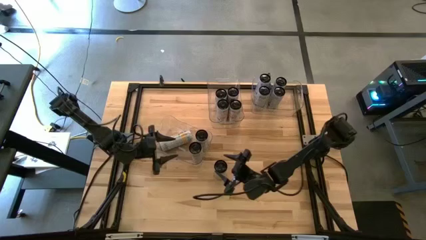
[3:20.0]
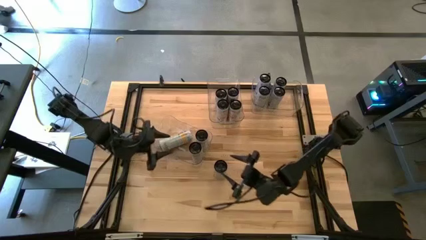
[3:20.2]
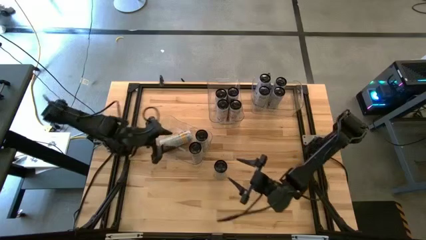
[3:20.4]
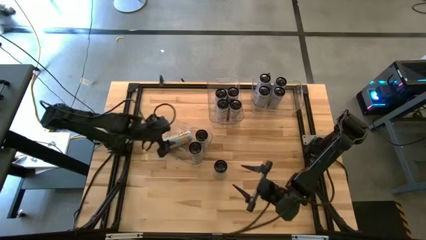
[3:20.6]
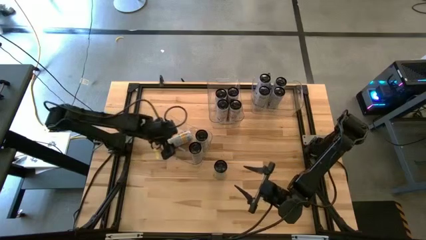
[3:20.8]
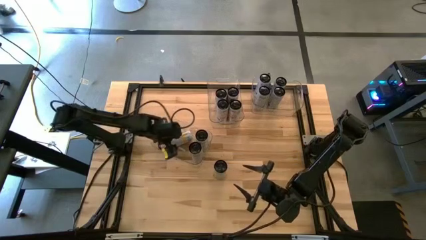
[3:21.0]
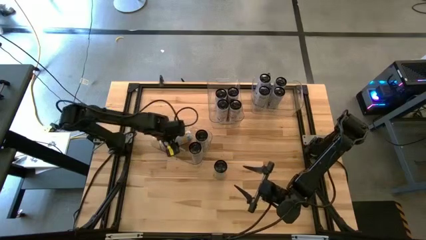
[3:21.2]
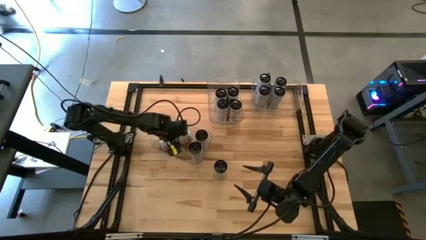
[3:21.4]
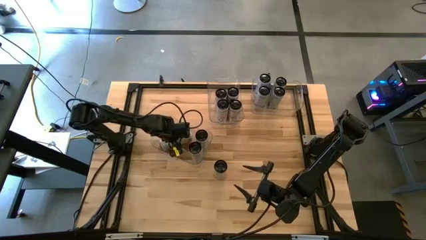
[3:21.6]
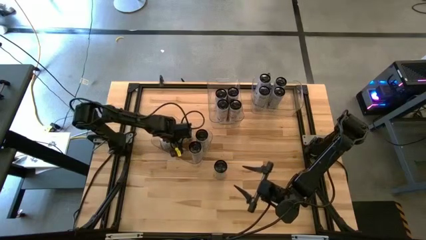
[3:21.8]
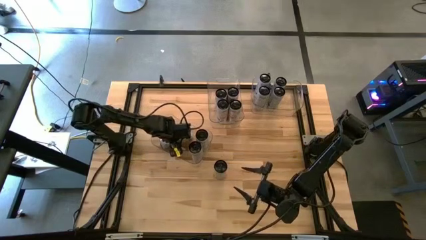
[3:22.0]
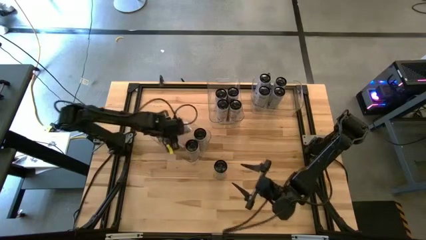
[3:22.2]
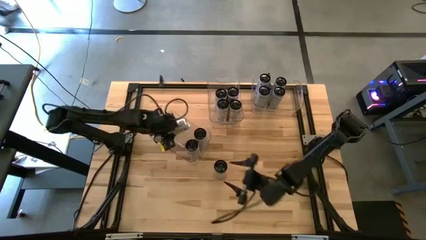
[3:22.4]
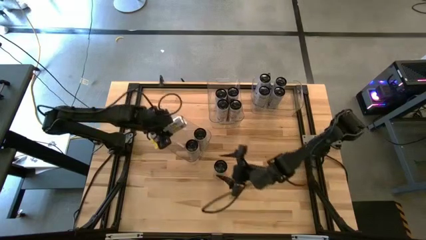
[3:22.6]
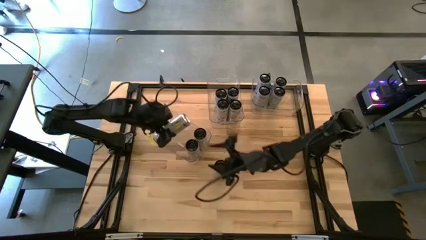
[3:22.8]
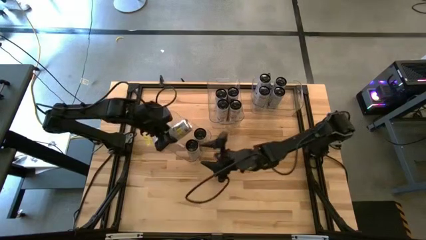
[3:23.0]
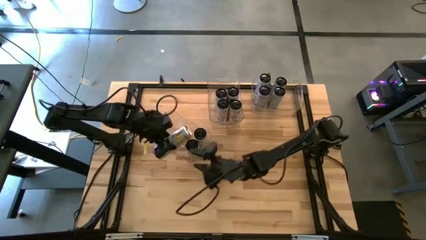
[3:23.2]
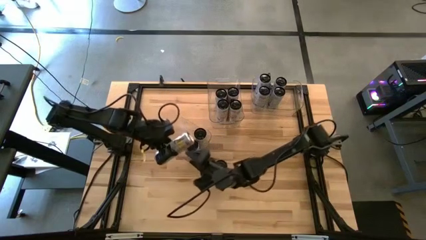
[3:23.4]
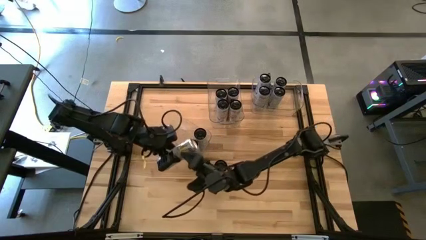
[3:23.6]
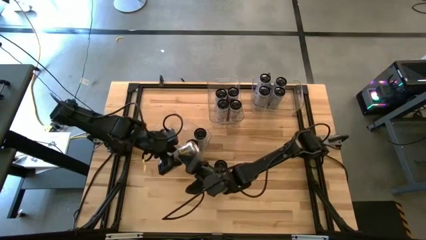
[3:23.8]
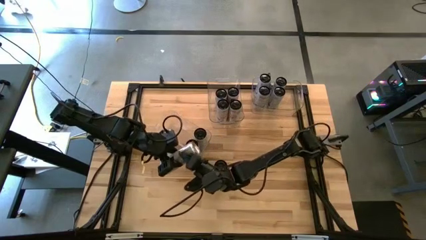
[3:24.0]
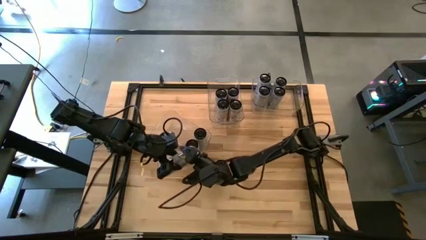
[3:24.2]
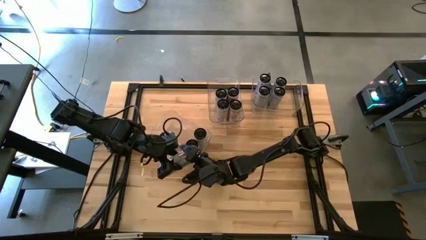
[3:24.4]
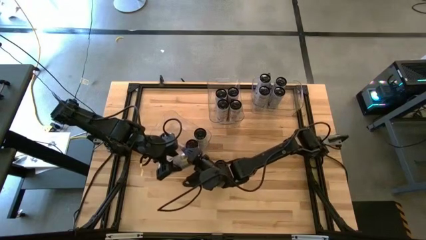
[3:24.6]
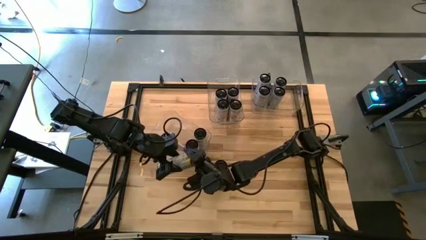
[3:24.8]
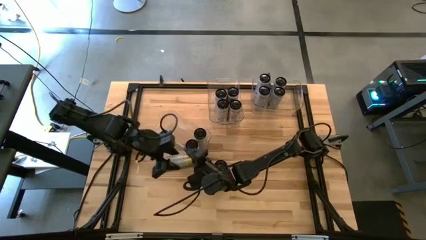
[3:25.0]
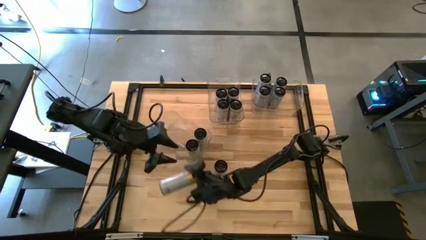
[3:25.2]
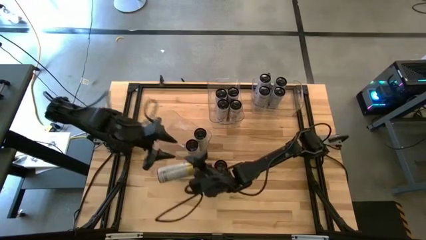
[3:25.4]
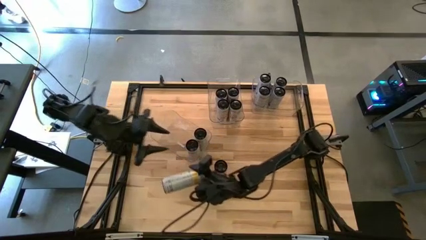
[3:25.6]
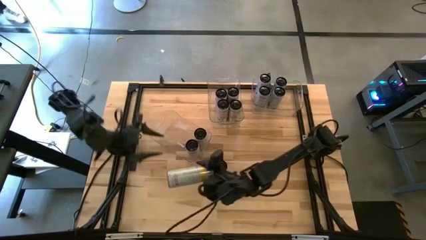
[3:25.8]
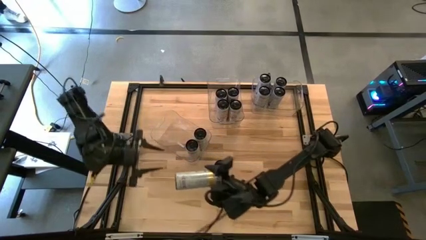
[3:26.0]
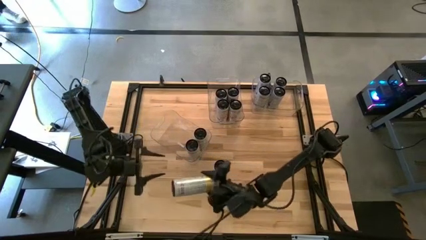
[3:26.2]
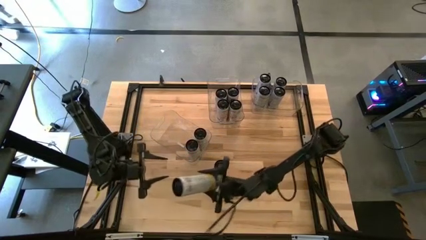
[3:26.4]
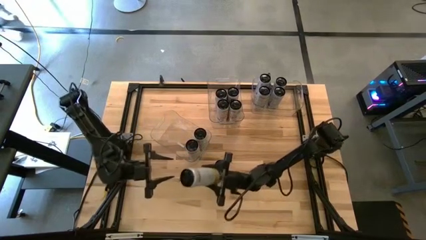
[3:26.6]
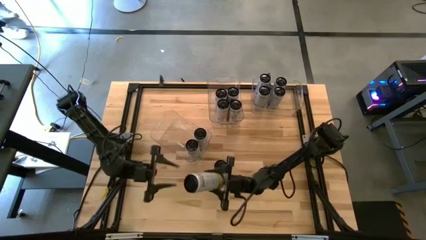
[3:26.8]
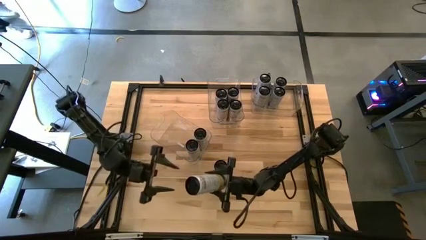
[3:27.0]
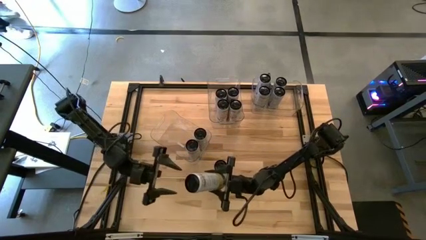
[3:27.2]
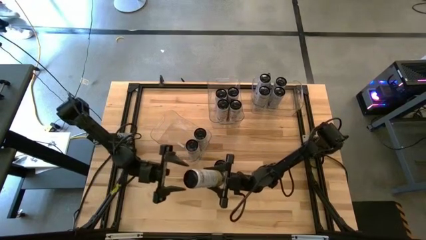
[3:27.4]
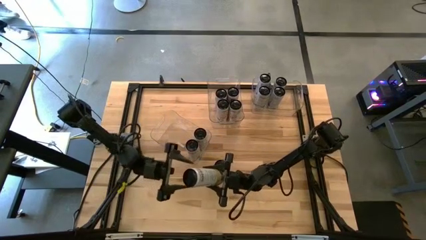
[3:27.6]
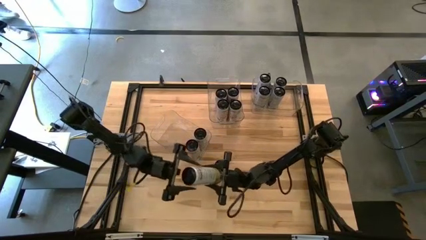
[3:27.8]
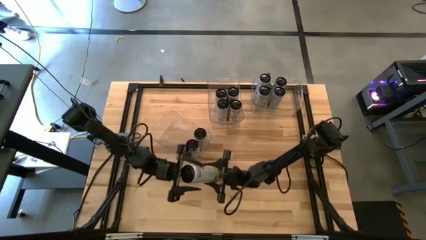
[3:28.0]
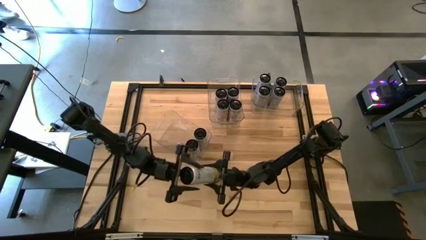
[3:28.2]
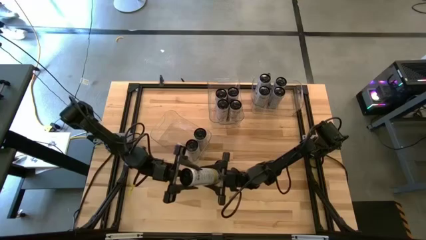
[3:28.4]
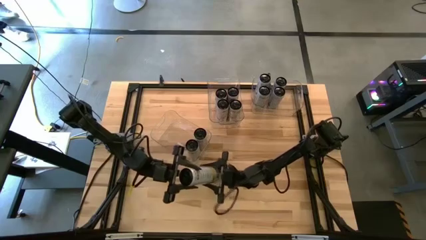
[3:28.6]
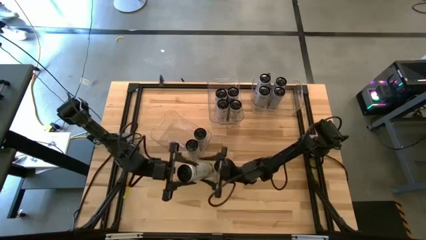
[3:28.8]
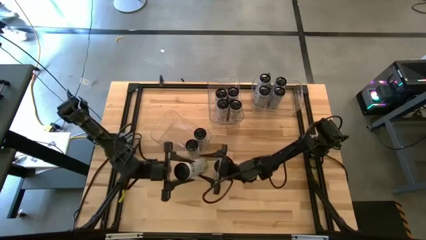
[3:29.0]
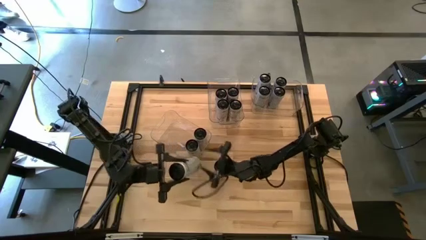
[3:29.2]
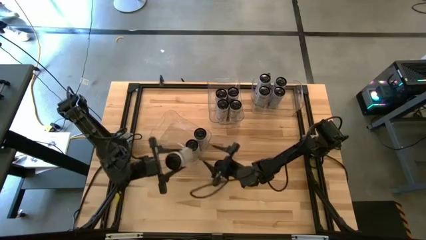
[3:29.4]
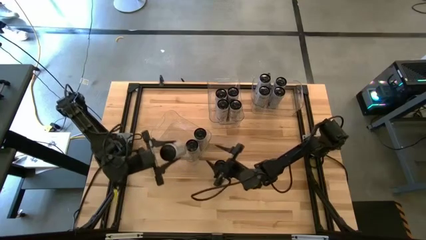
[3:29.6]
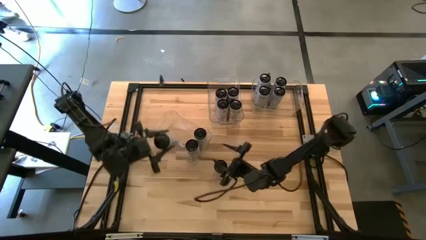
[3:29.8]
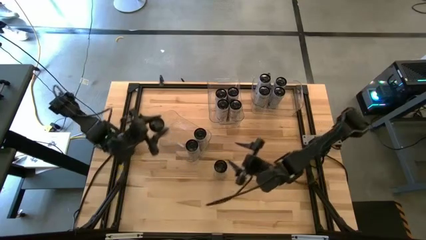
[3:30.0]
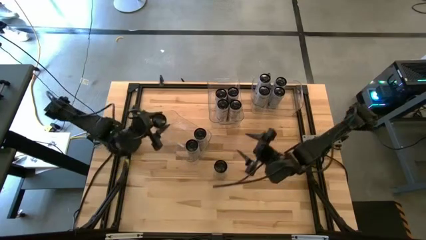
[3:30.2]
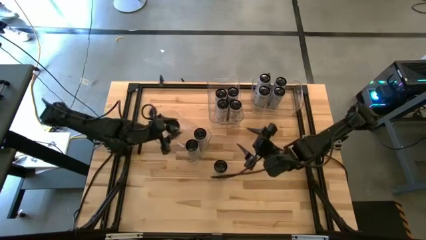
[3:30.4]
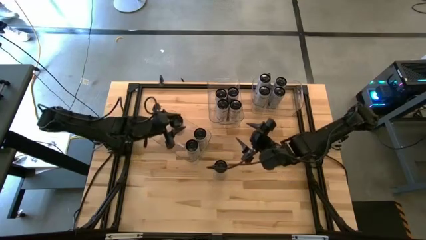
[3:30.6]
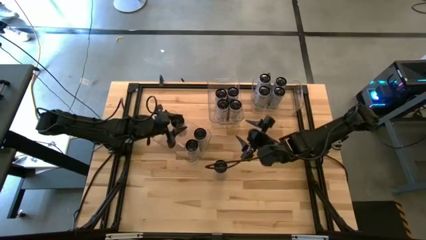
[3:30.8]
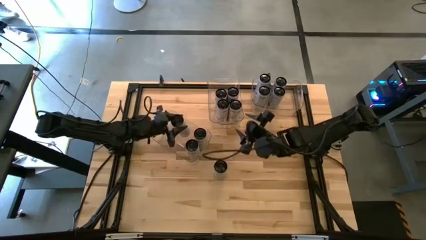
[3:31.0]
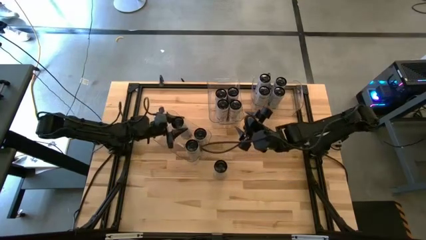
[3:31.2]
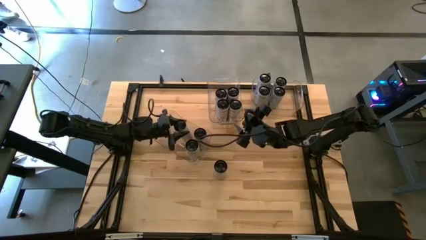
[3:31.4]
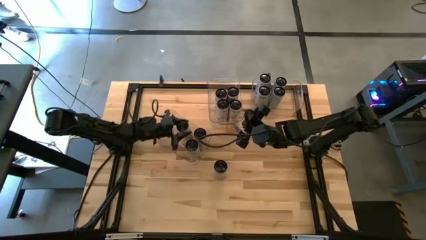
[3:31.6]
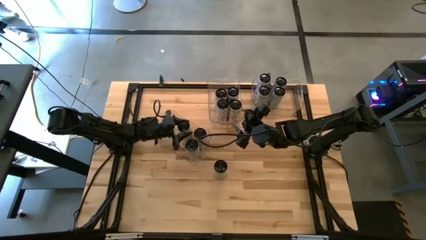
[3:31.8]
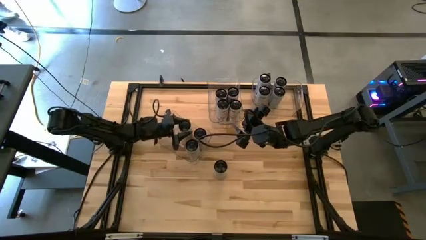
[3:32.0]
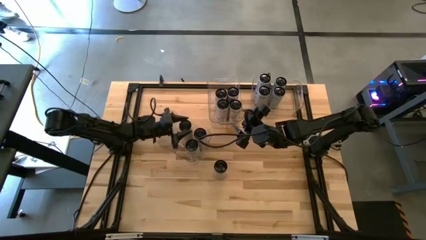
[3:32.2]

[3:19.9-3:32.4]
Task: Sort soda cans
Adjust the white-yellow soda can into the top left transparent bin

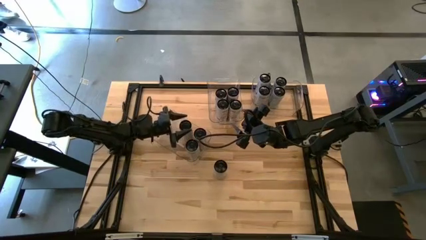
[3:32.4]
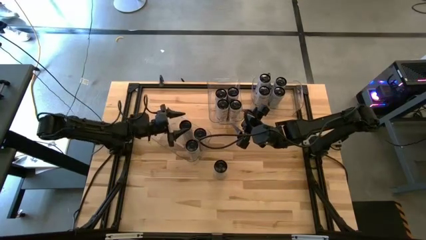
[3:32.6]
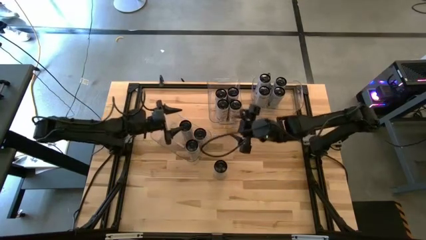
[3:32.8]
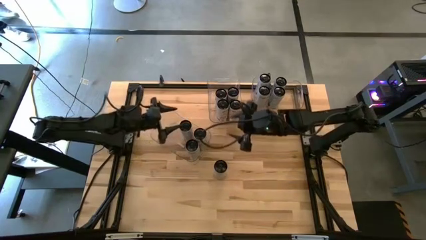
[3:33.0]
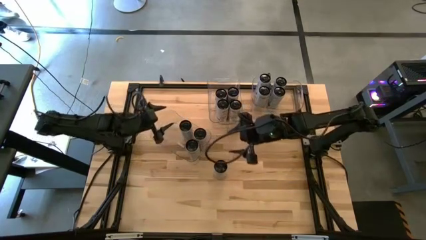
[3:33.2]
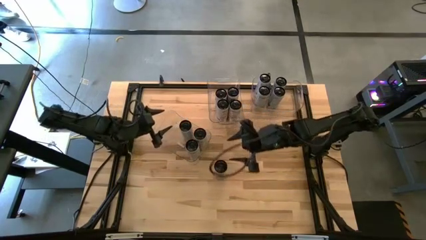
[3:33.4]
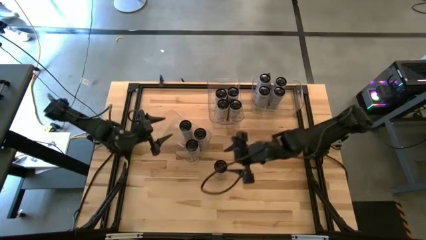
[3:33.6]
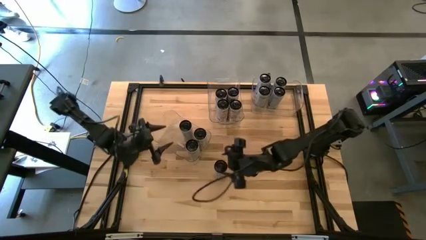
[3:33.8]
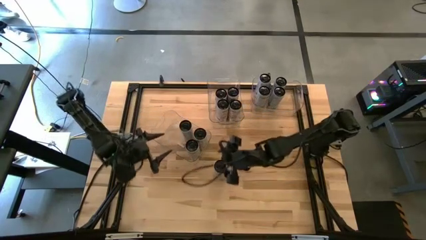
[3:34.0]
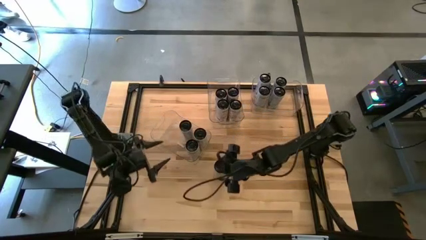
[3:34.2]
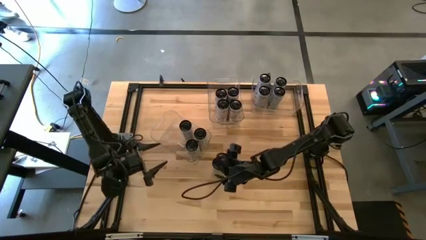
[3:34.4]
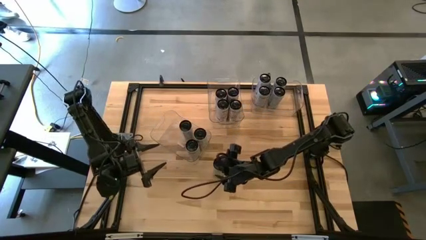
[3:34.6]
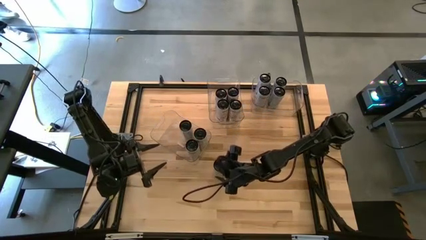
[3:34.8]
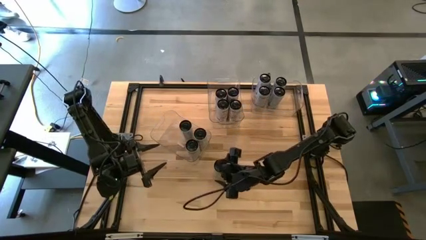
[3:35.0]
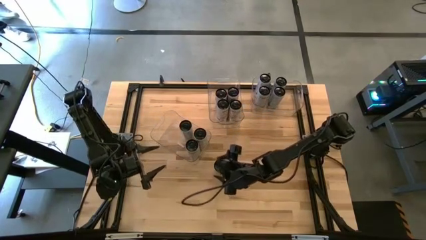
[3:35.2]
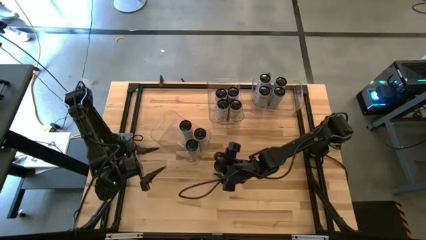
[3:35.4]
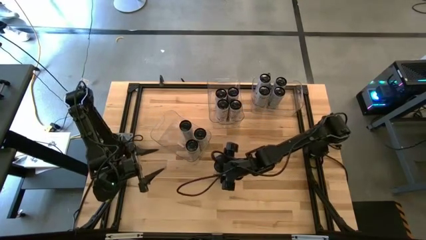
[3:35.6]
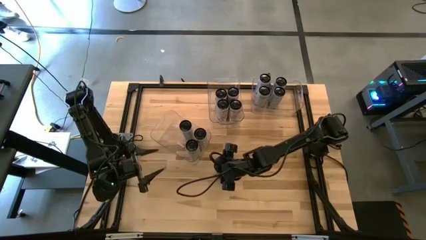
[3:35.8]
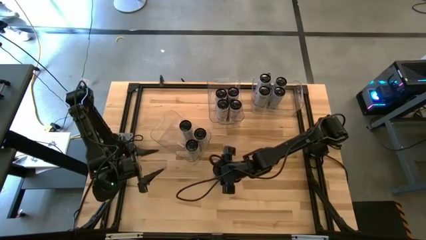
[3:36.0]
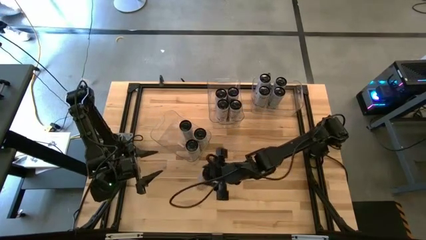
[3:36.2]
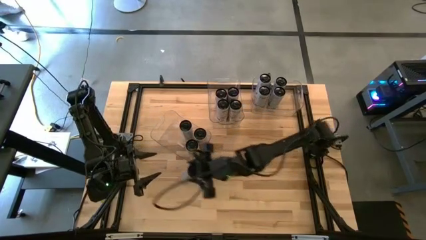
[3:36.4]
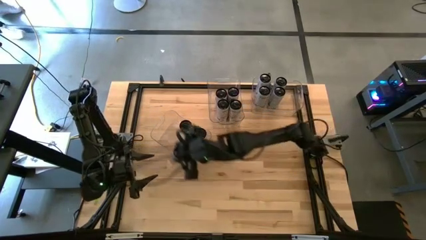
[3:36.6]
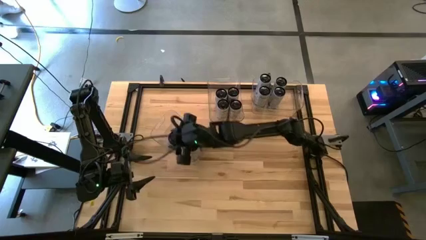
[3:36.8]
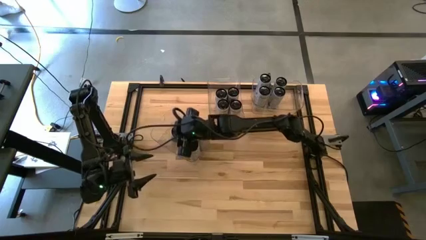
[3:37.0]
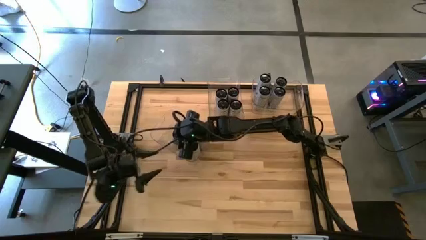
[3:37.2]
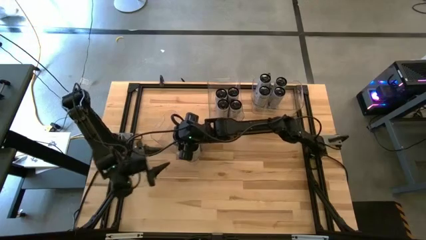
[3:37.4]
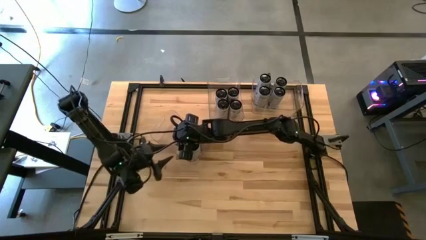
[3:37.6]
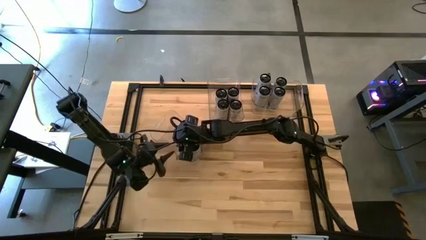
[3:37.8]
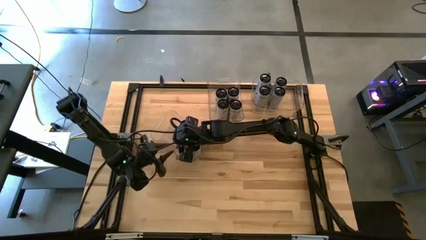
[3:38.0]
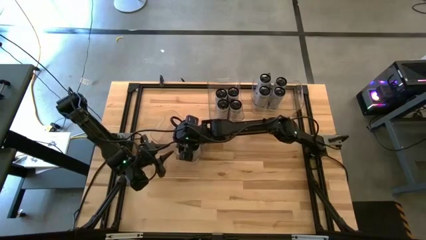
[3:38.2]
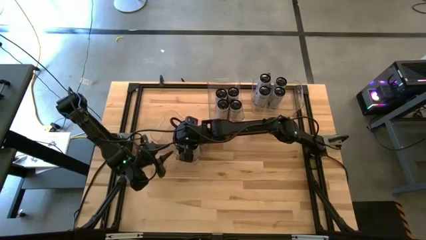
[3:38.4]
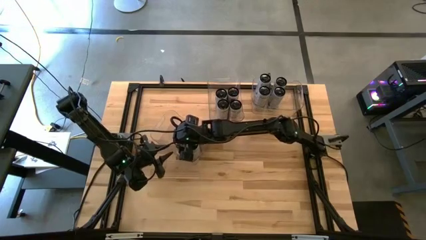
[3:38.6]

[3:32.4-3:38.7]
Put the white-yellow soda can into the top left transparent bin
